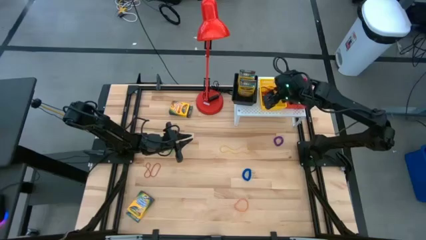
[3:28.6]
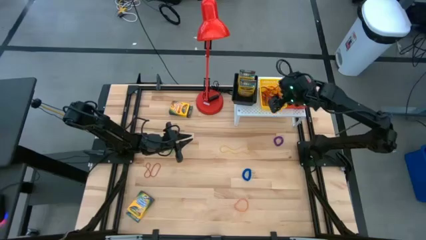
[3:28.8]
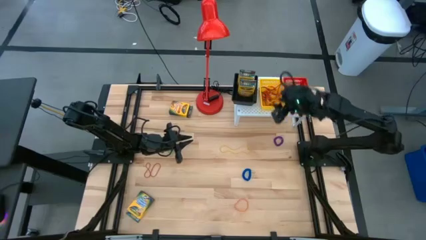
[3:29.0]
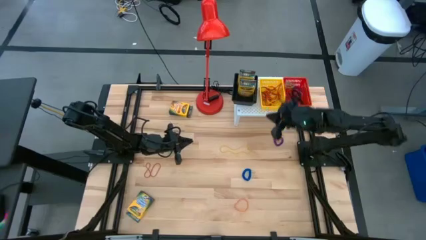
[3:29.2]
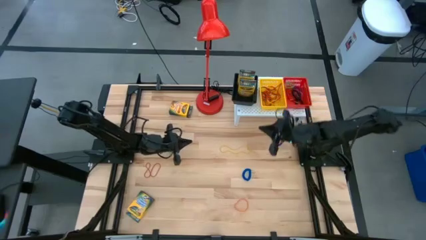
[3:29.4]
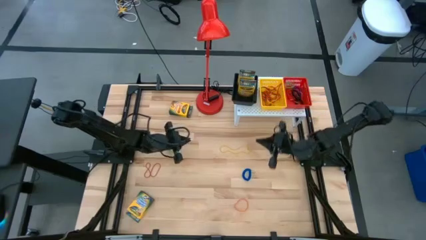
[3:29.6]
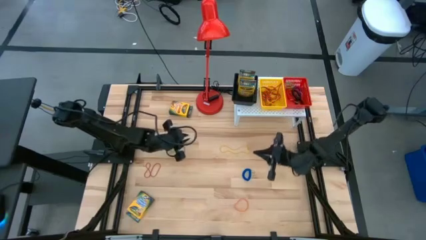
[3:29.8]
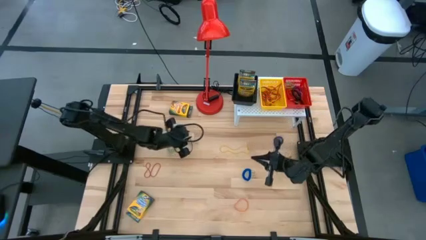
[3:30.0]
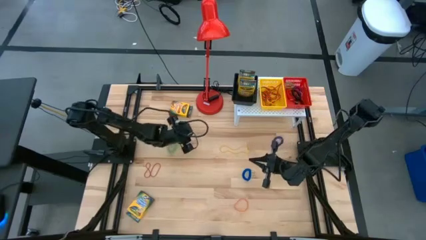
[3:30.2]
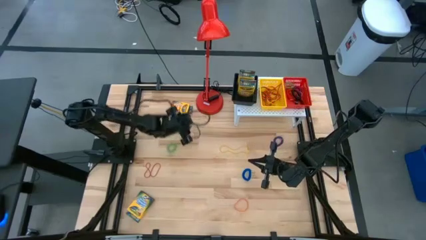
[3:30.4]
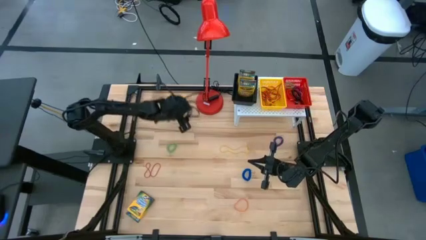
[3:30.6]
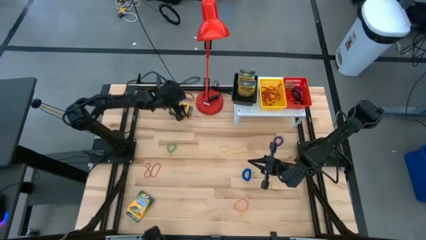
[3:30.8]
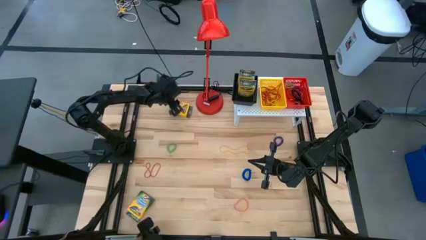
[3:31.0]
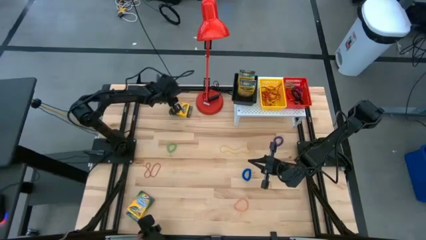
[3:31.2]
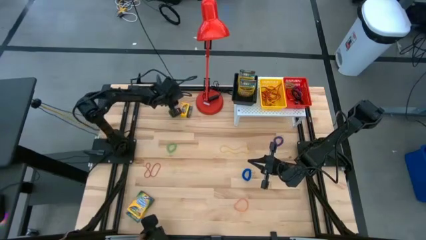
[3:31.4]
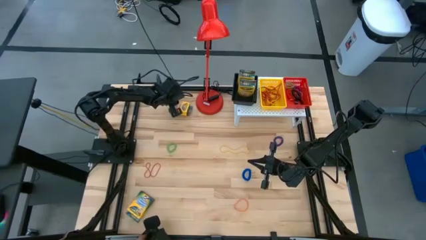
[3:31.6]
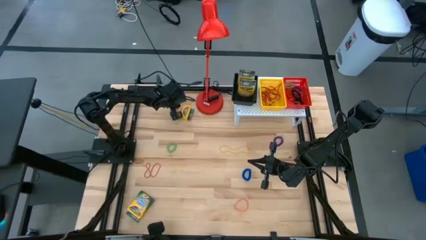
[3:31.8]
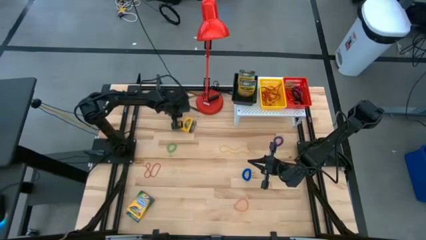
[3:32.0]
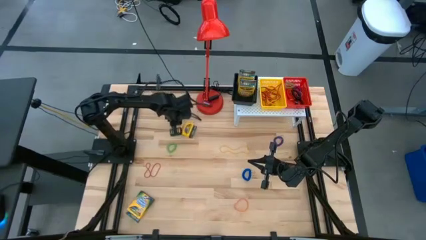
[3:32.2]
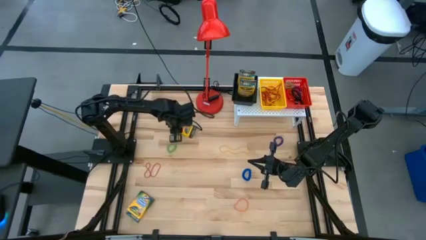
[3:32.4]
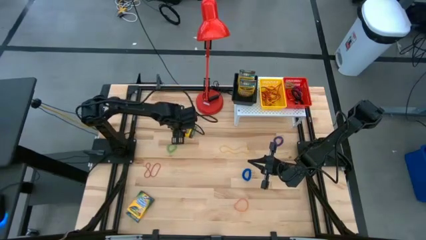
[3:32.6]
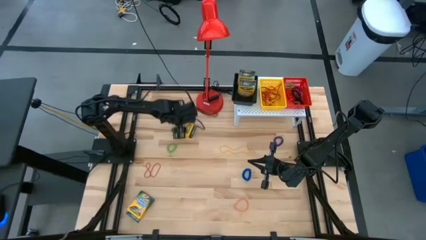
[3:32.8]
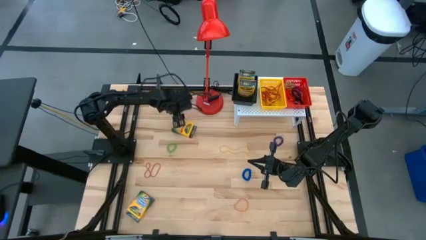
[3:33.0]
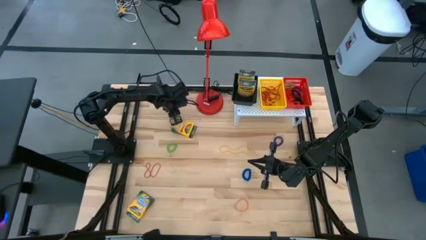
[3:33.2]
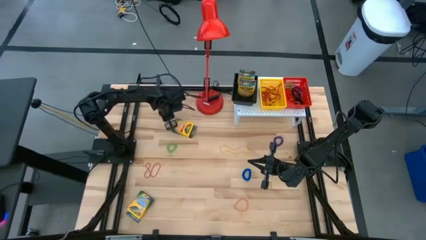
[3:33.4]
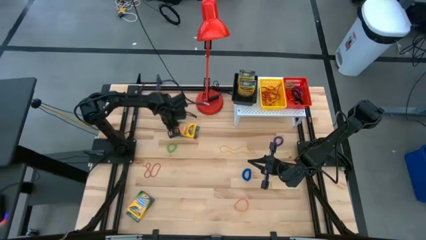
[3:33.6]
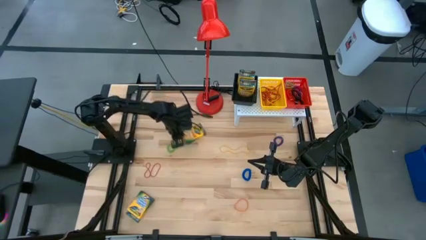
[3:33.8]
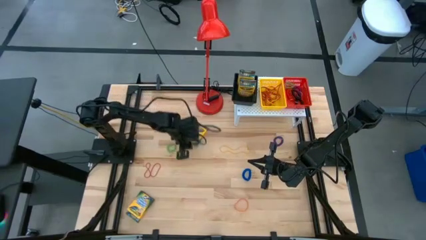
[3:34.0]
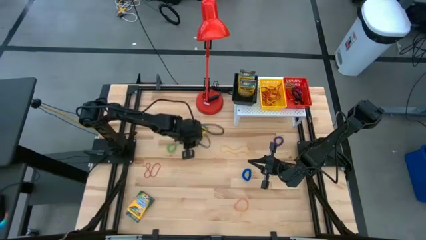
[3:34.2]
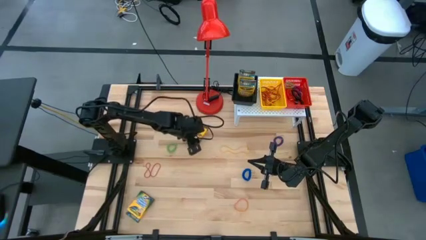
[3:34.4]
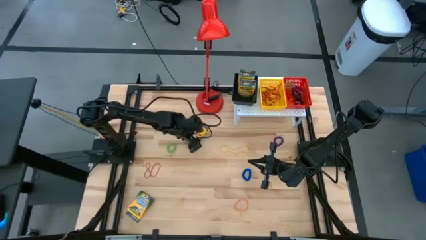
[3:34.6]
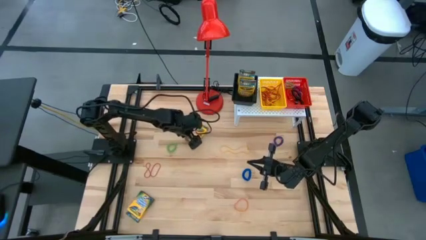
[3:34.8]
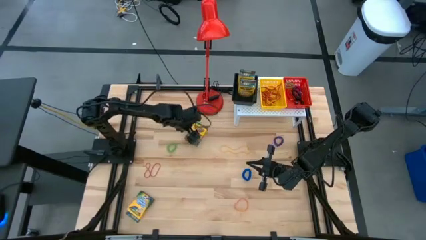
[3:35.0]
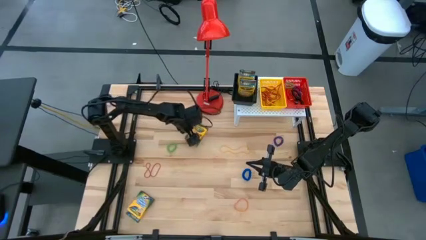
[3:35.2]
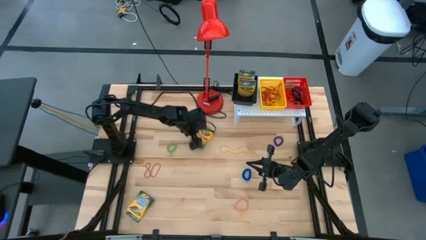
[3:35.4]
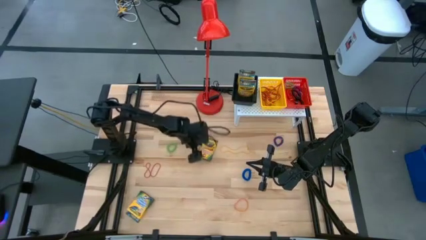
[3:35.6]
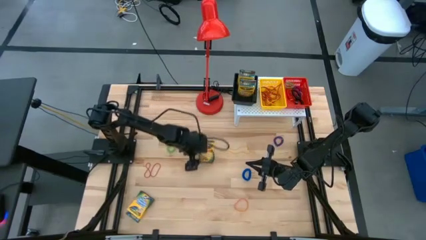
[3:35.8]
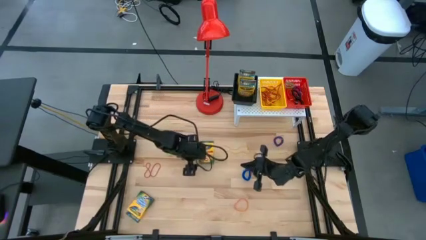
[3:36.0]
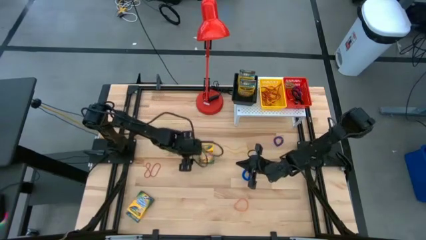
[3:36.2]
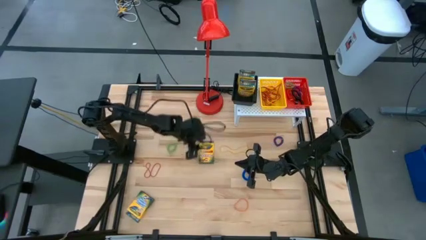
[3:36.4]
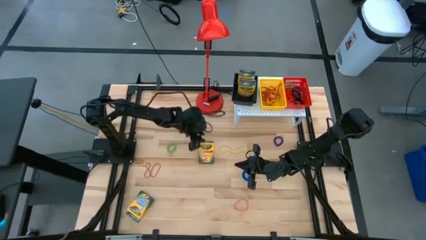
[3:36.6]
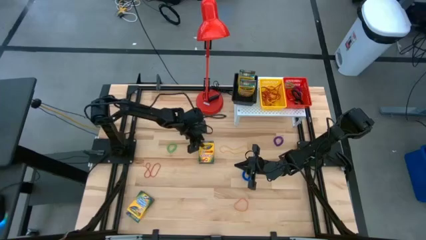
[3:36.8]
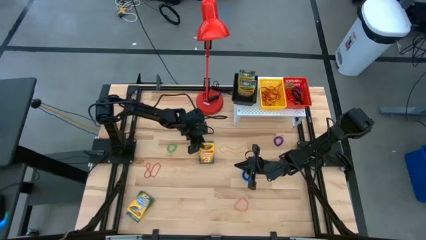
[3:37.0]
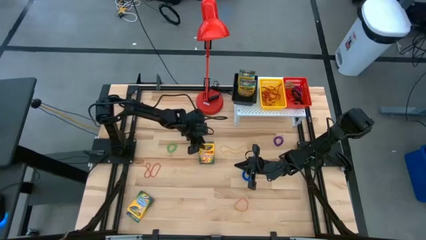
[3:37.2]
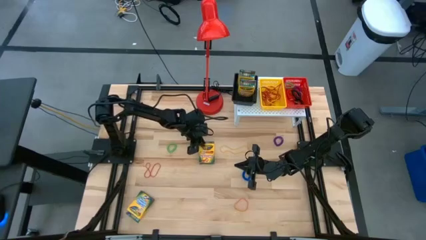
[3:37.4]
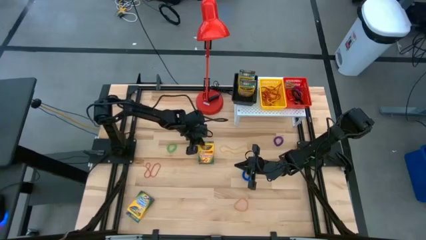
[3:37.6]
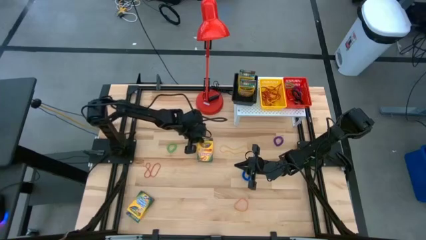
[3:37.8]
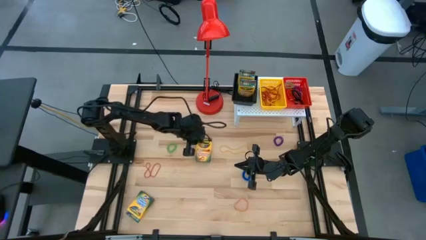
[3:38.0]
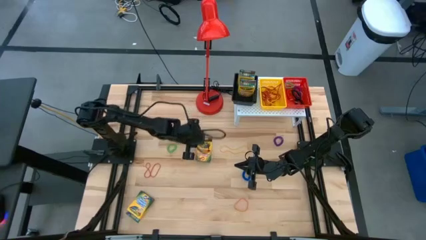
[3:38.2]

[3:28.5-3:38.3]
Task: Pick & Place Office Desk Supplies
Put the top crayon box into the black bin

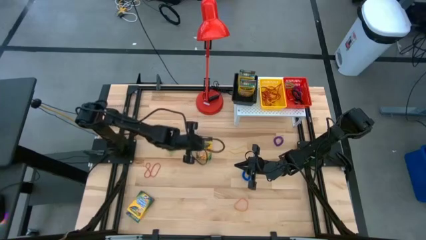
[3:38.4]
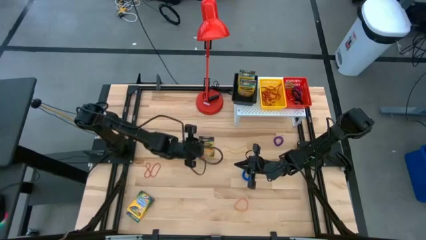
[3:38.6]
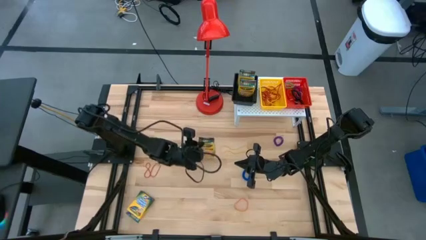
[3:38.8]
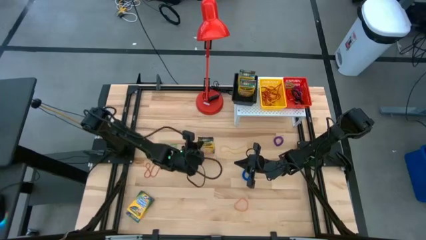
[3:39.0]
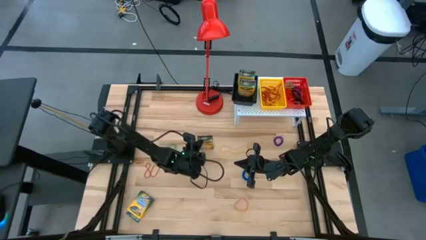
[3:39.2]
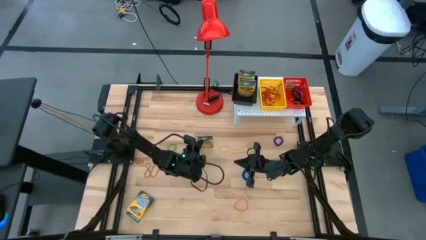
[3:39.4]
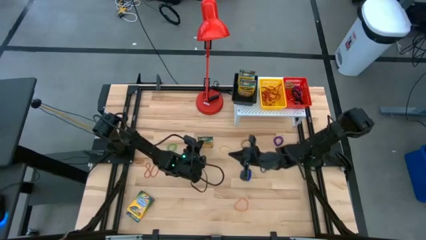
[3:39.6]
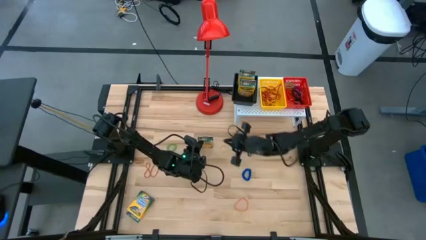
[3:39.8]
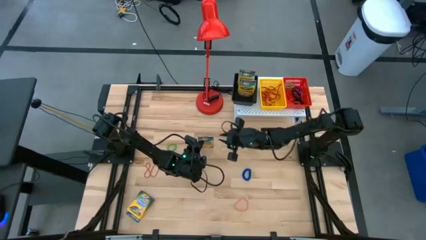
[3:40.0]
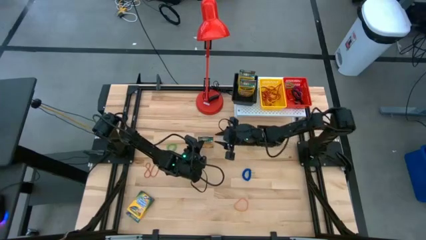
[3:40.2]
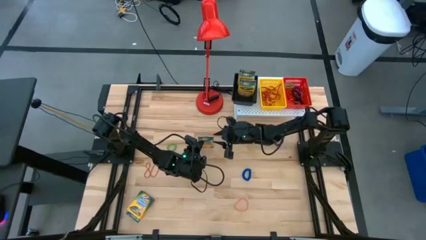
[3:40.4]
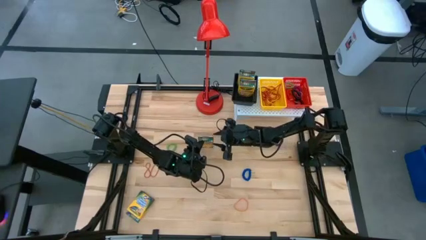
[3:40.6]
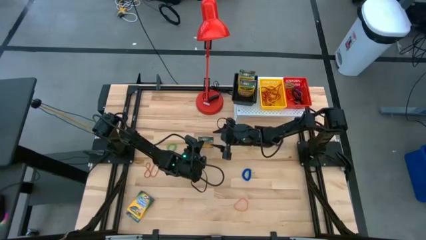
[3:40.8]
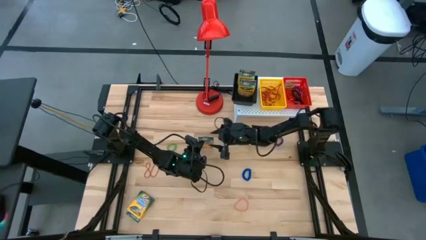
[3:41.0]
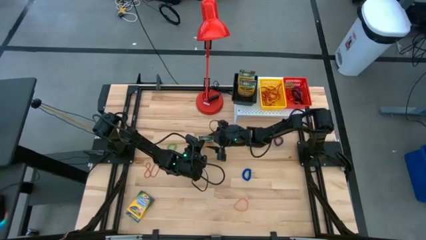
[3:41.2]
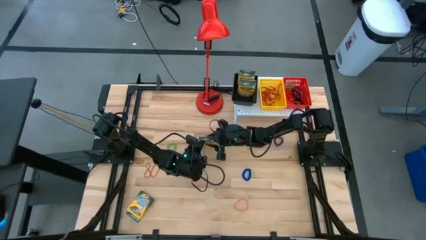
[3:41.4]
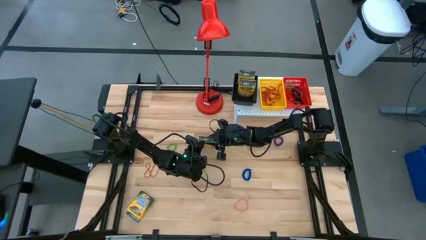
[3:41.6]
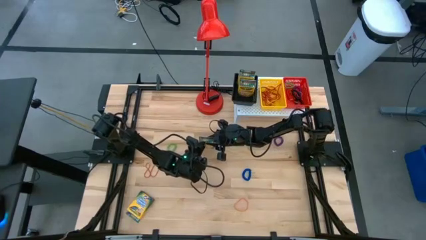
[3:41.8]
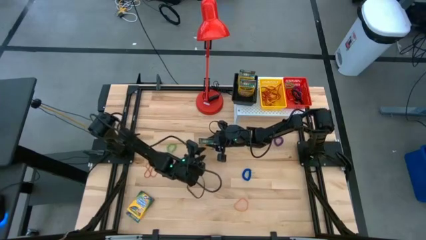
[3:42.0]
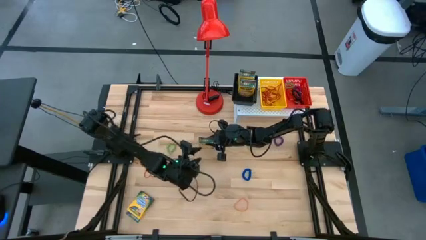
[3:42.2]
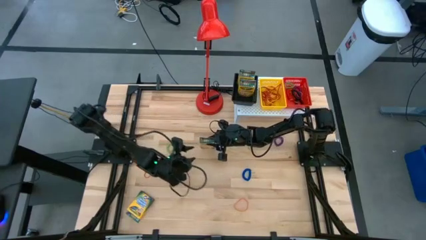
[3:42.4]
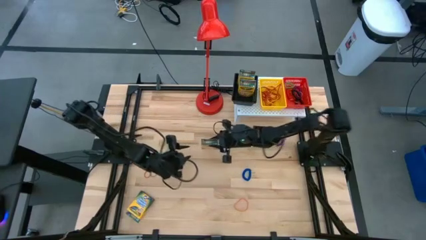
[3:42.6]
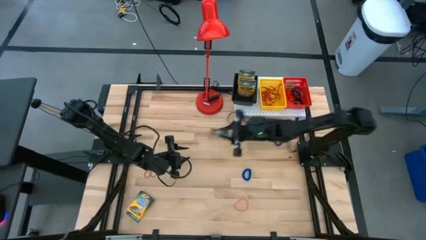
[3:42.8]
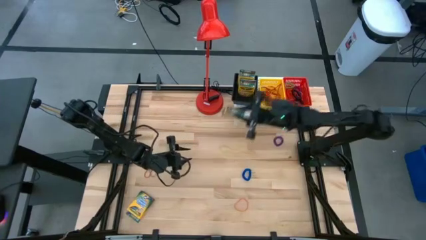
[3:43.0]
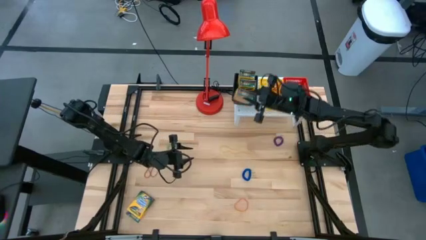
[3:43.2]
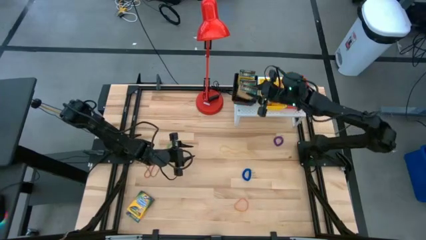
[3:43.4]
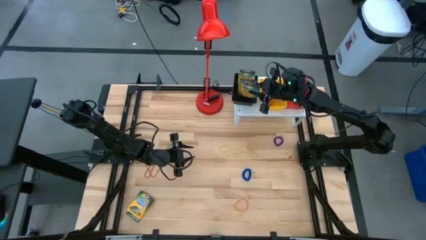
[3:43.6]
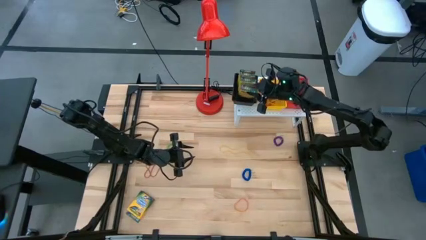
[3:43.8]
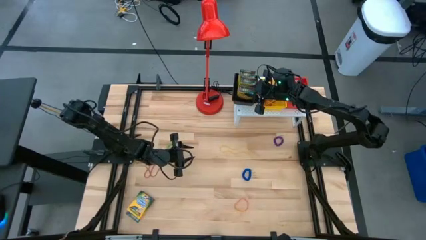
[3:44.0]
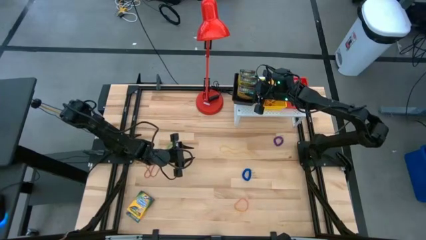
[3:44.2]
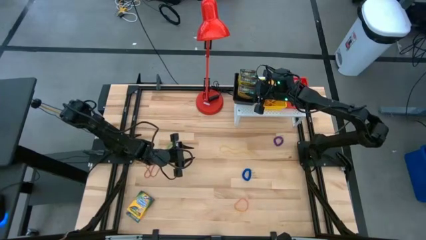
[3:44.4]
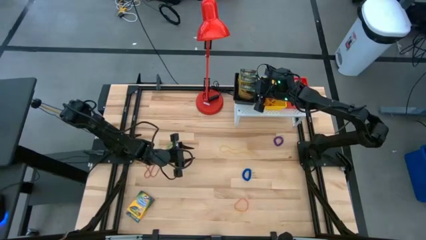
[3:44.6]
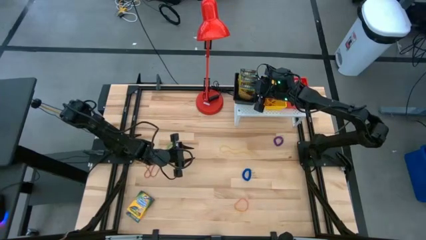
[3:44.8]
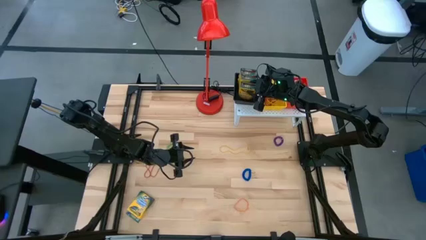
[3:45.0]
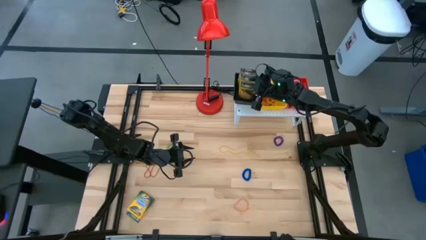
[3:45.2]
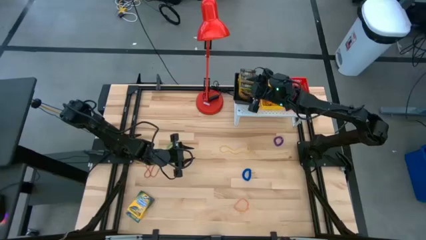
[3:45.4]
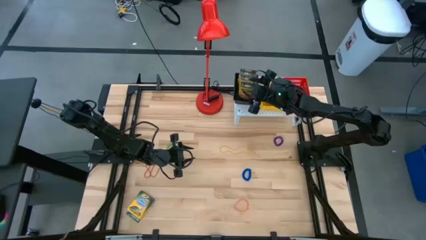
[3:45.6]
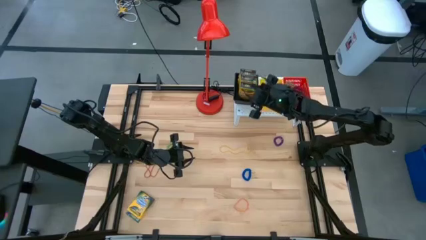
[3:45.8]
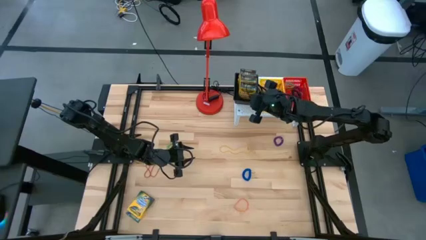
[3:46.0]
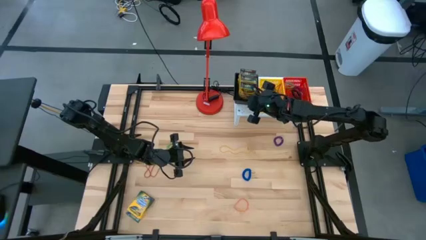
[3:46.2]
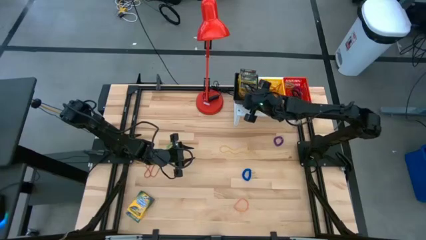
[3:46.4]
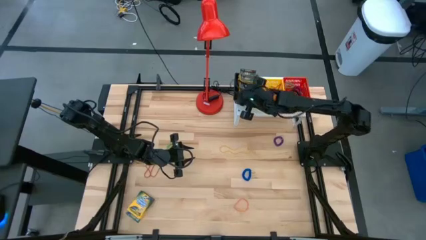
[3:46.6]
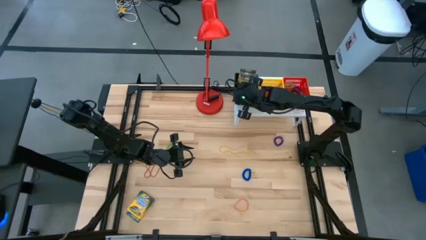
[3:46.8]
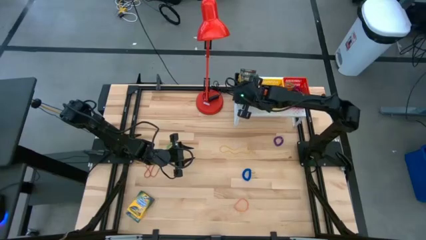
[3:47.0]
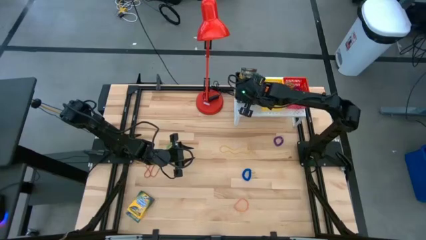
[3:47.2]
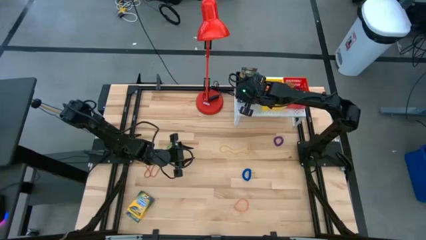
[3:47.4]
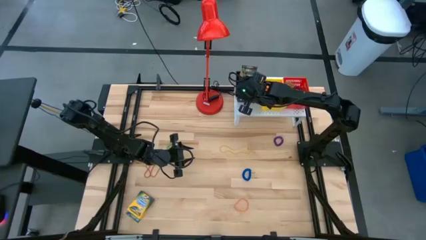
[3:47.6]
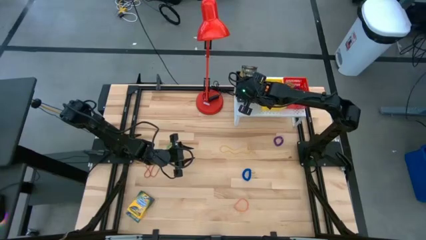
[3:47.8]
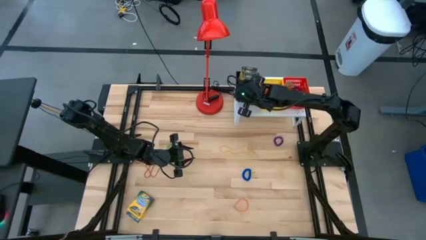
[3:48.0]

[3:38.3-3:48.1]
Put the top crayon box into the black bin
